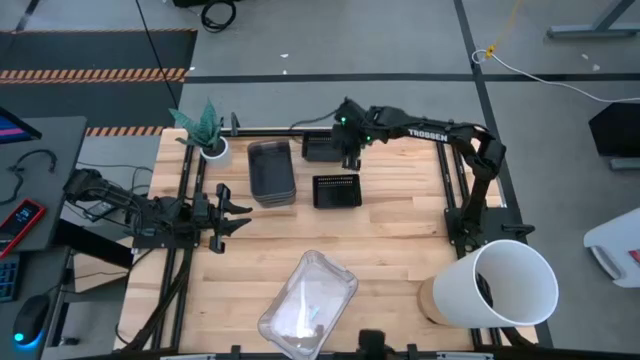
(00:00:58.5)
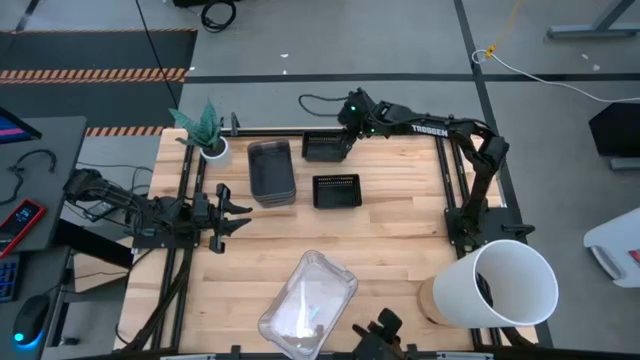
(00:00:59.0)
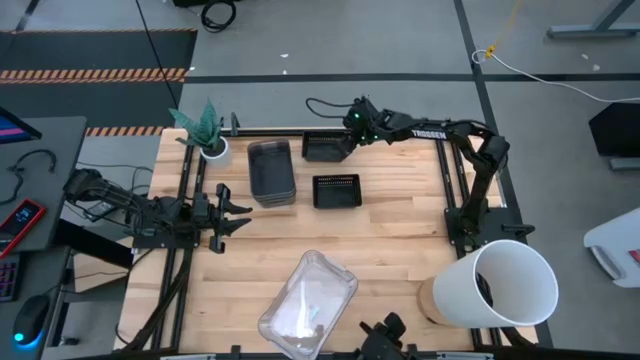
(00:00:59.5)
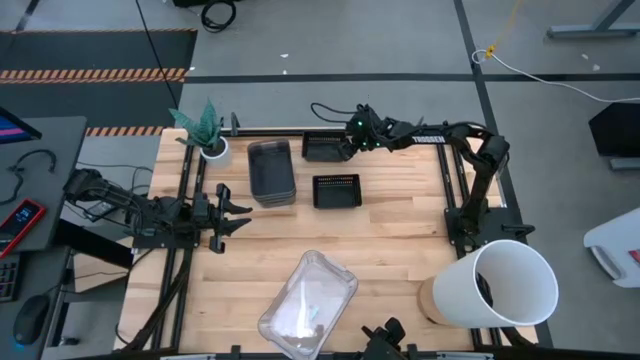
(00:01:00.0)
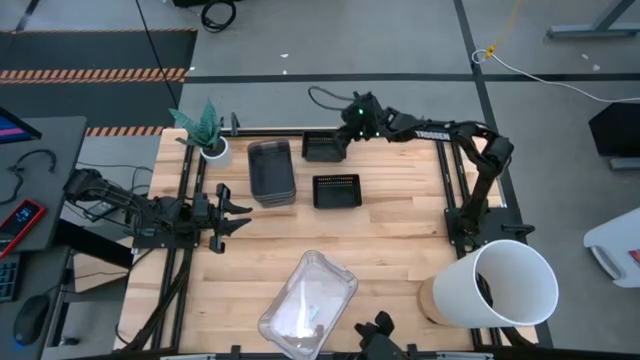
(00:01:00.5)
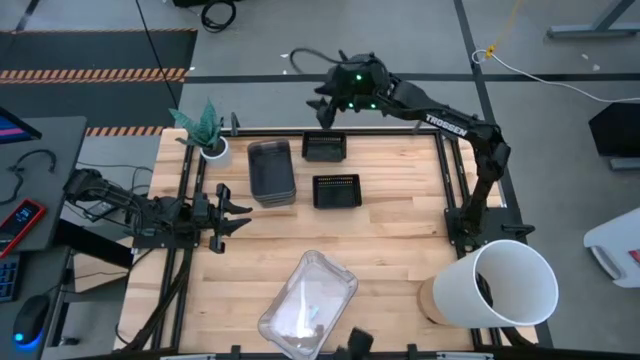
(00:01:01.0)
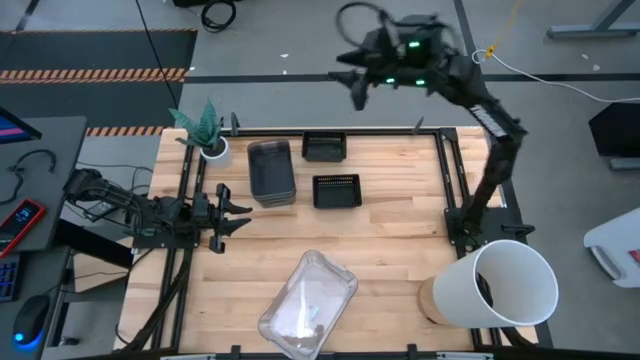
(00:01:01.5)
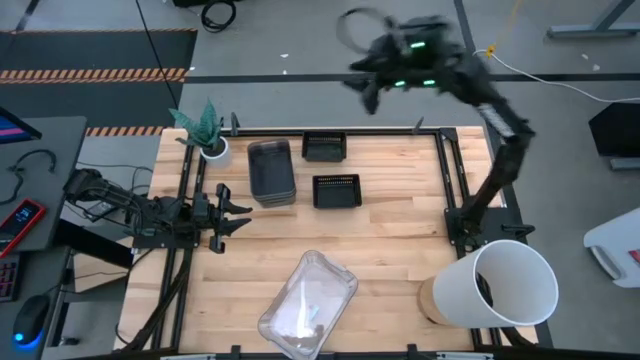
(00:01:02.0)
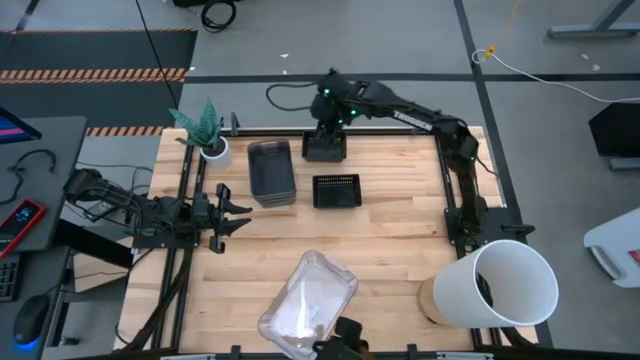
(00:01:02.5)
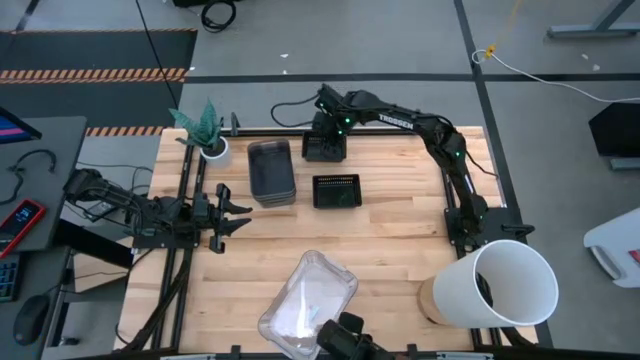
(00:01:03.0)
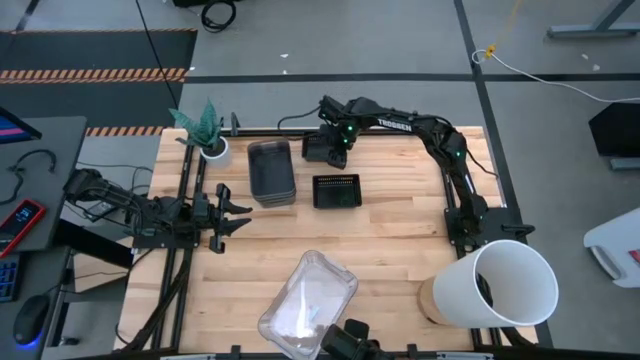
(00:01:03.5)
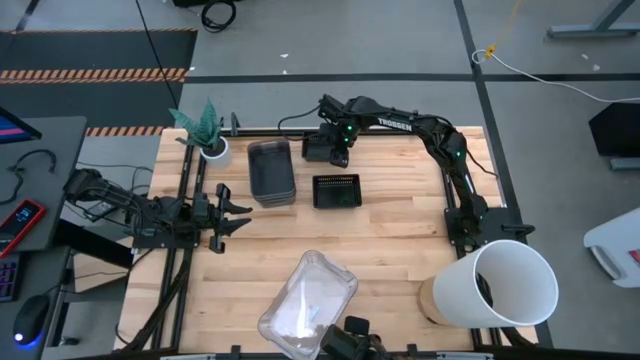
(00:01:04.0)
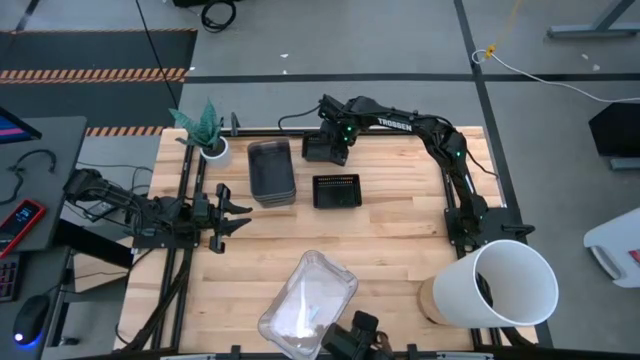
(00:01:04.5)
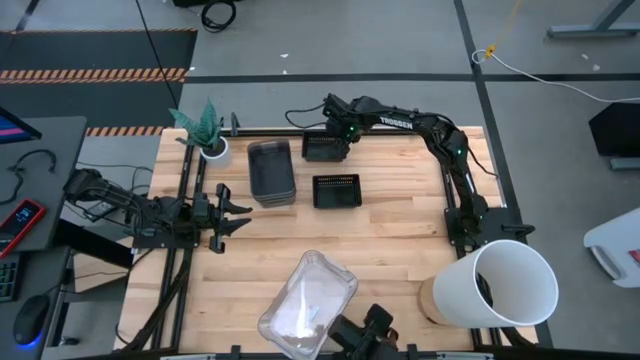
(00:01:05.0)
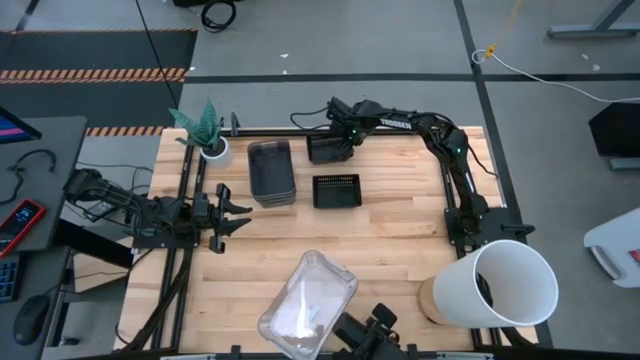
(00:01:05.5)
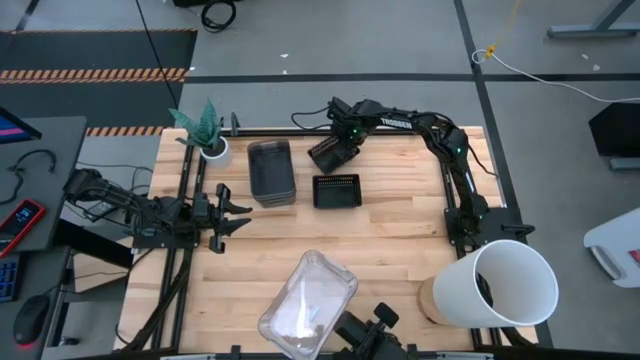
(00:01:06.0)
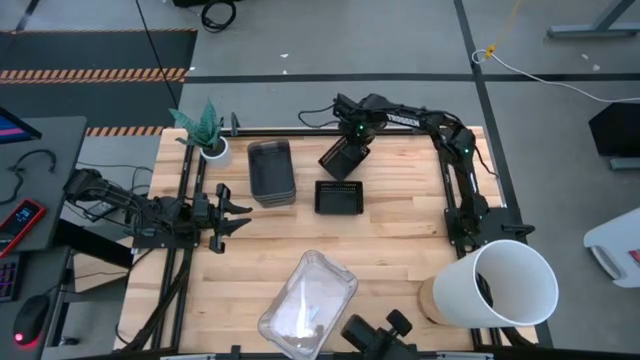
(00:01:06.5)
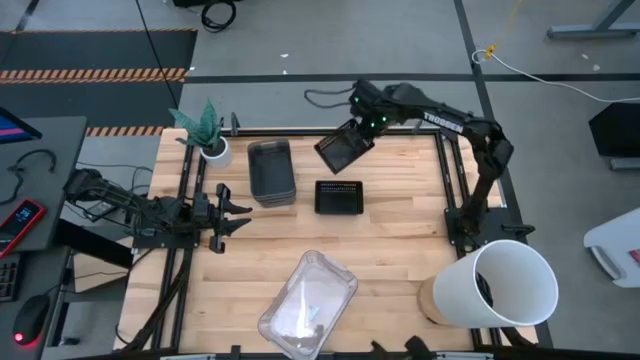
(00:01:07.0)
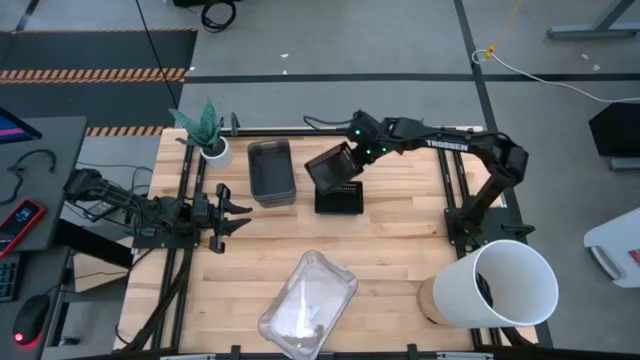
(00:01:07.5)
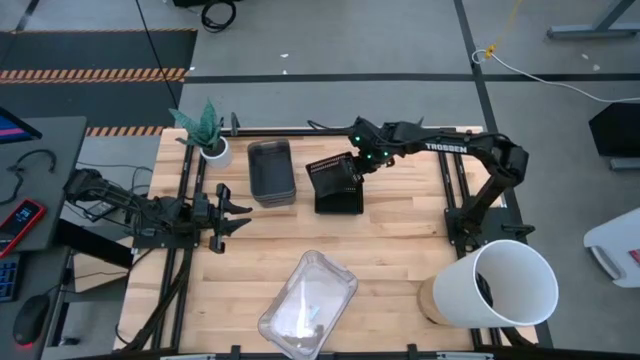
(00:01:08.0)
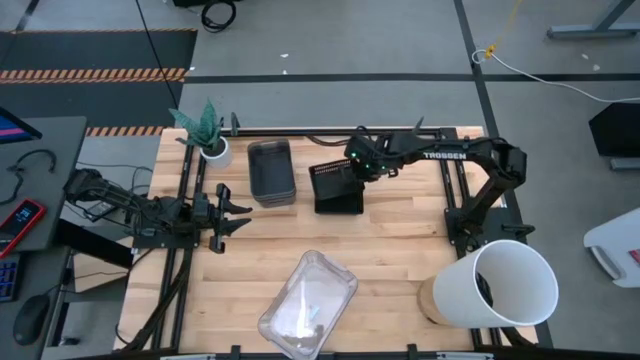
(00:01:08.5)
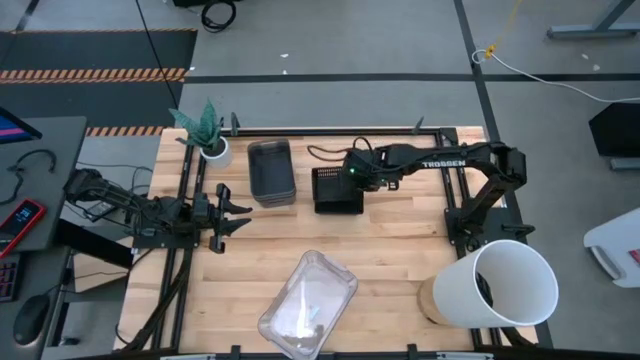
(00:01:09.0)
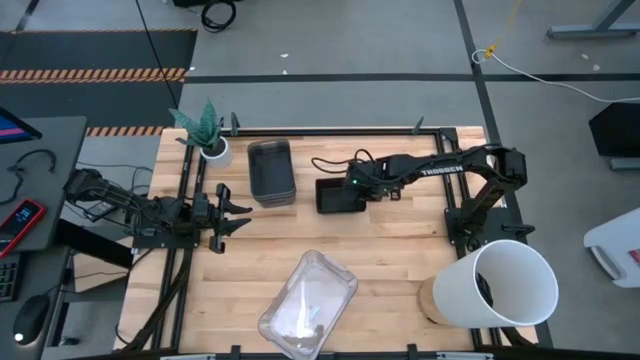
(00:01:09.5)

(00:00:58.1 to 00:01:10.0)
Stack the top black bin on top of the bottom black bin

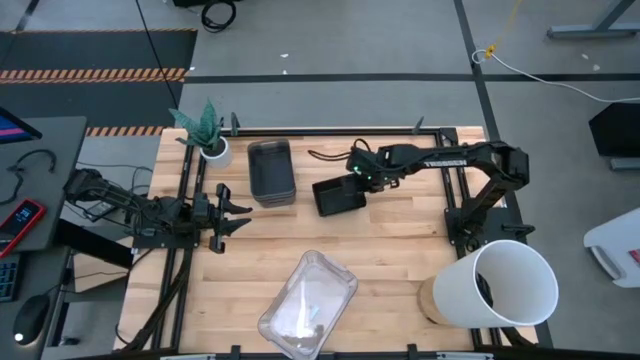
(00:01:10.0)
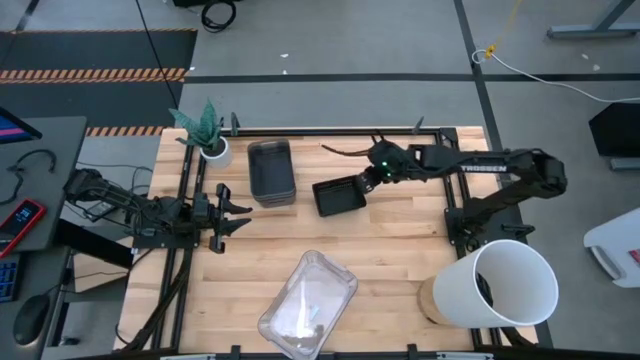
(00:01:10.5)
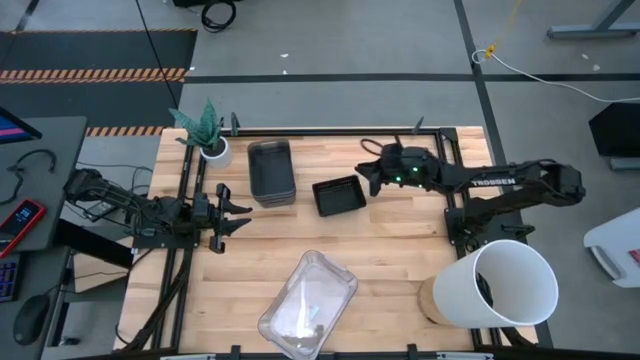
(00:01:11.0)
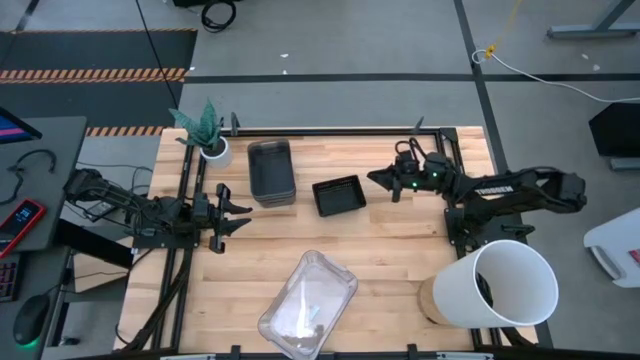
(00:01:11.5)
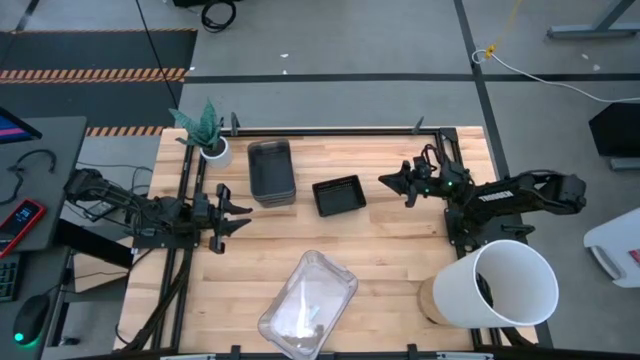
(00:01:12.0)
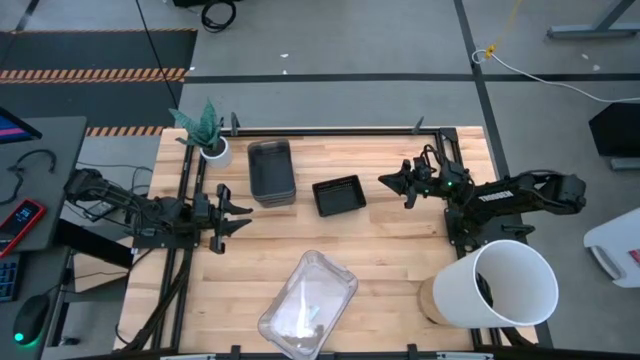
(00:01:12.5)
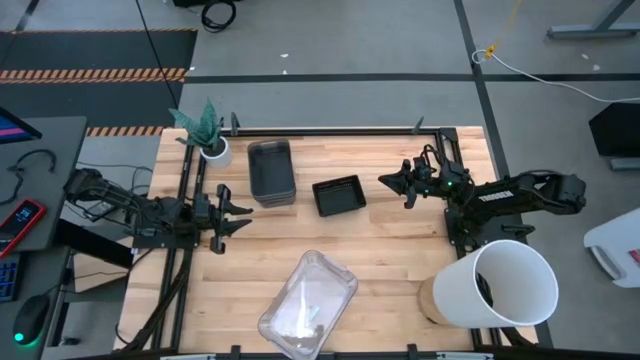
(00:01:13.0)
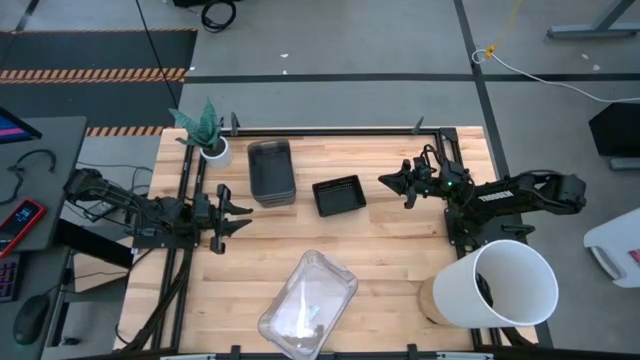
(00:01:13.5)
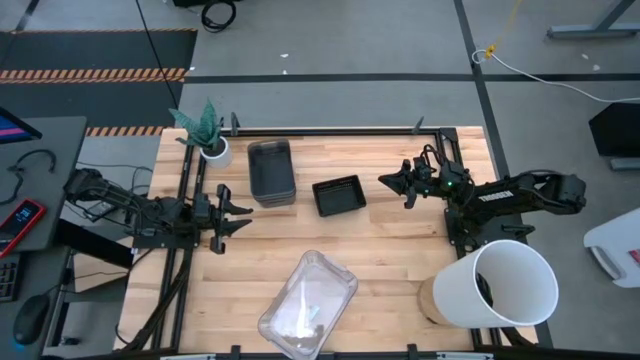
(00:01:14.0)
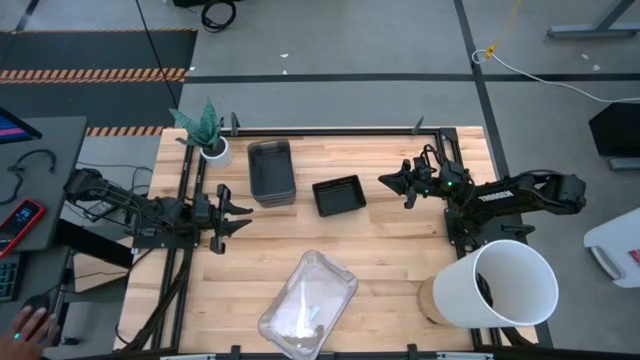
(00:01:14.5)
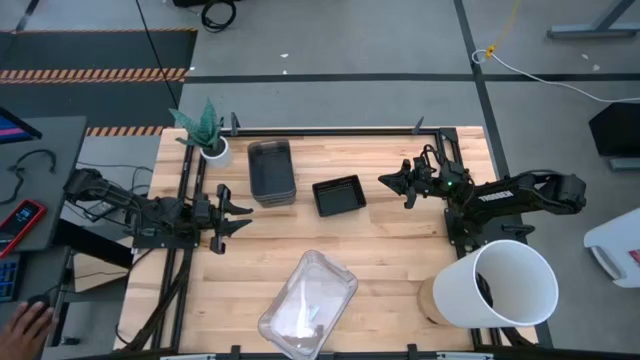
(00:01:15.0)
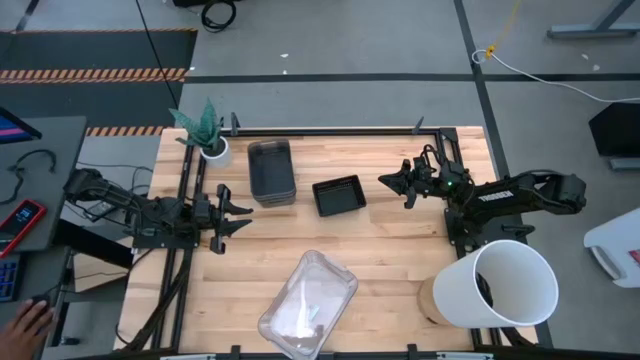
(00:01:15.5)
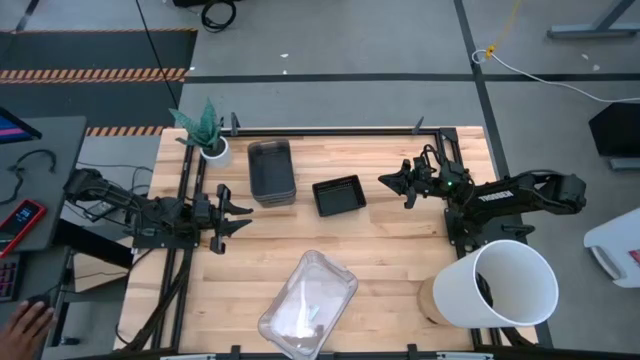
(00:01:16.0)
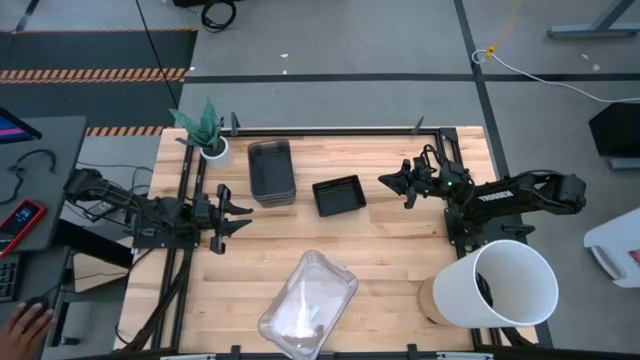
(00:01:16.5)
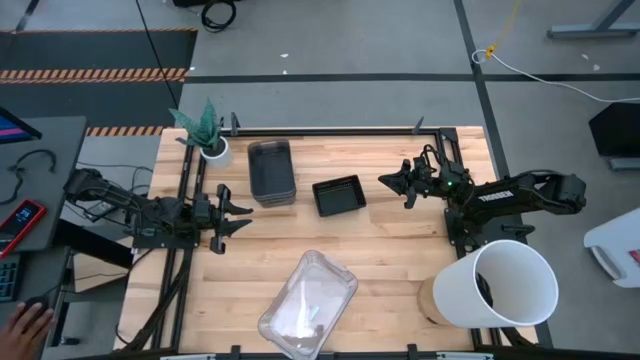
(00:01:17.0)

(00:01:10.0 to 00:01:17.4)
Return to Home Position
